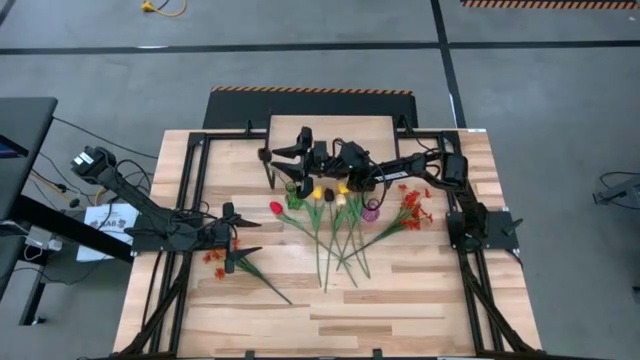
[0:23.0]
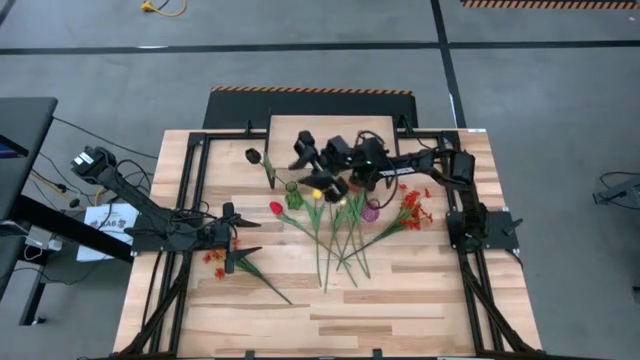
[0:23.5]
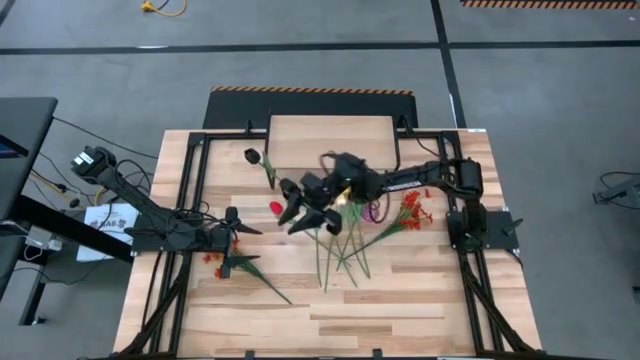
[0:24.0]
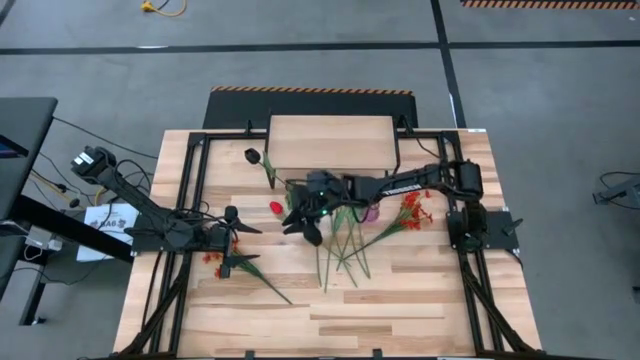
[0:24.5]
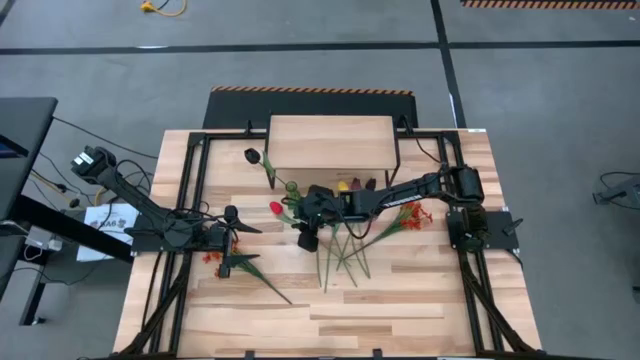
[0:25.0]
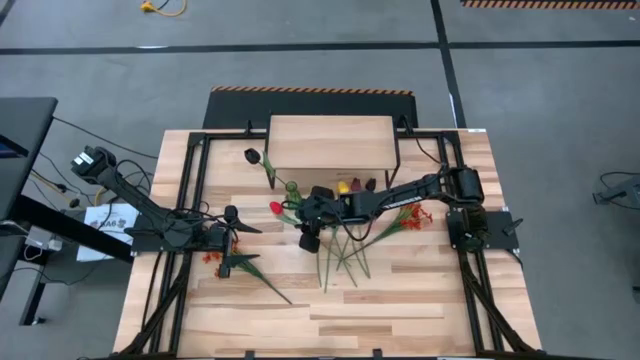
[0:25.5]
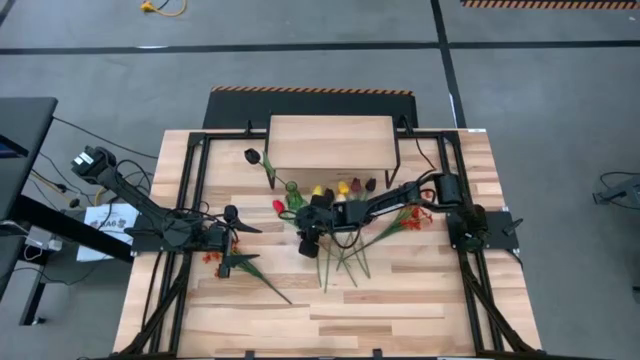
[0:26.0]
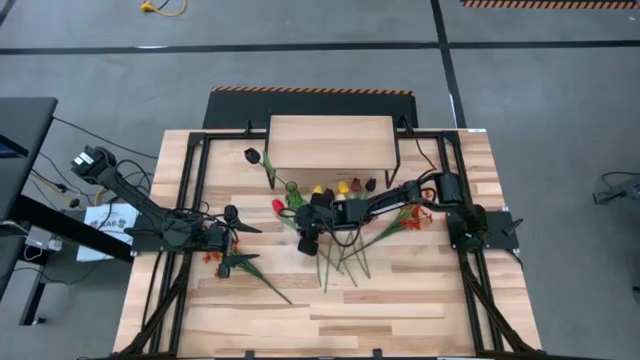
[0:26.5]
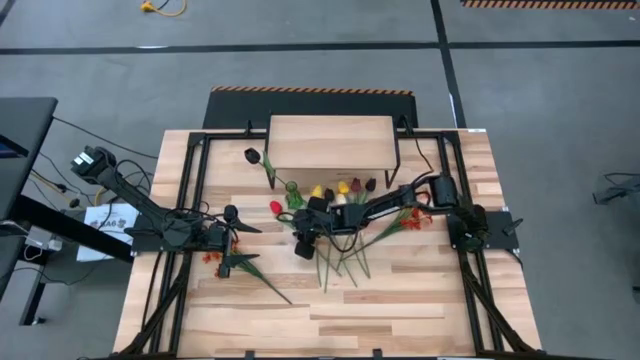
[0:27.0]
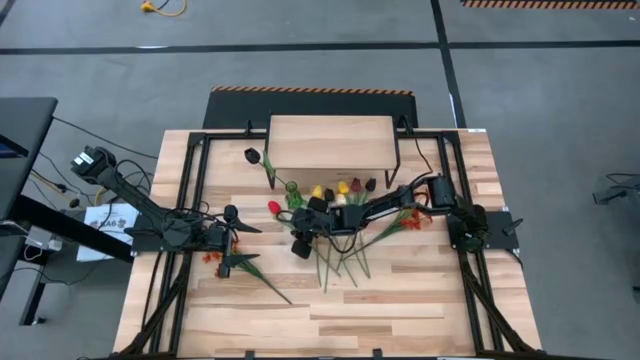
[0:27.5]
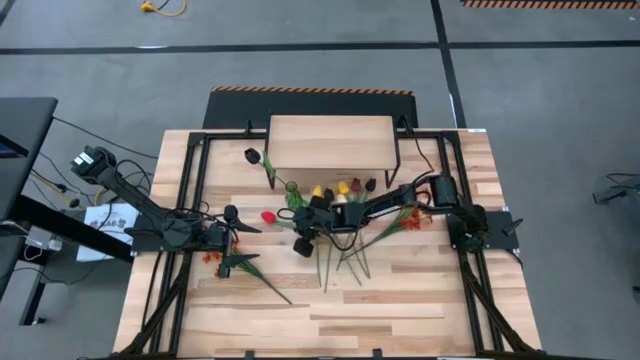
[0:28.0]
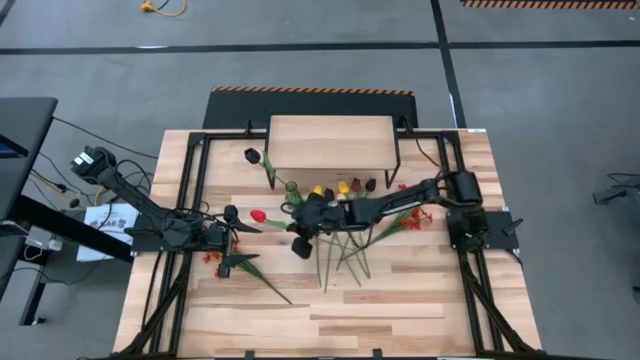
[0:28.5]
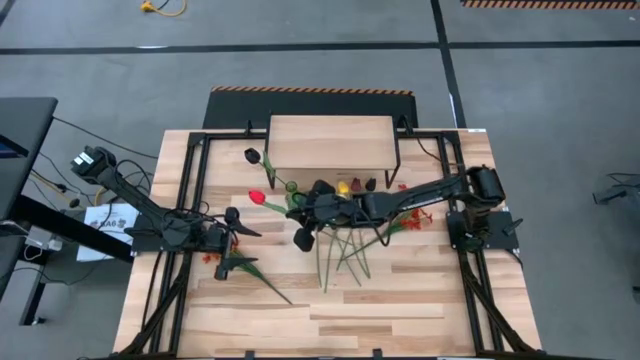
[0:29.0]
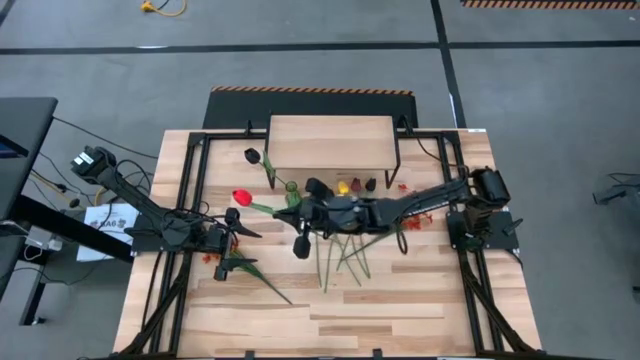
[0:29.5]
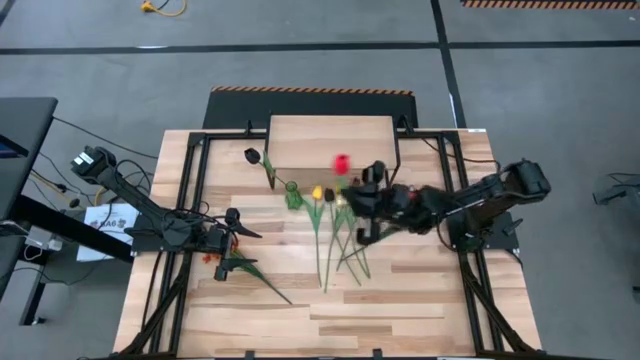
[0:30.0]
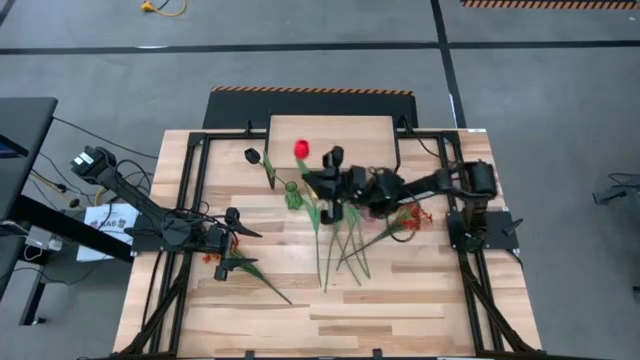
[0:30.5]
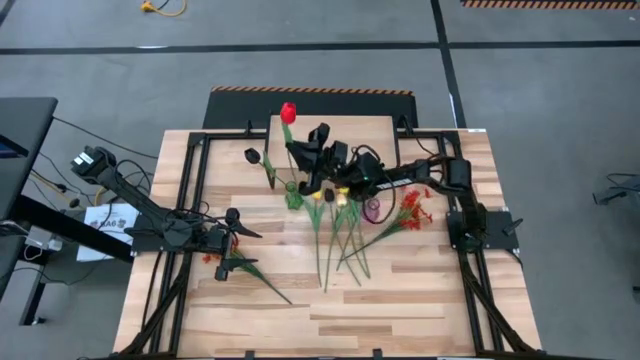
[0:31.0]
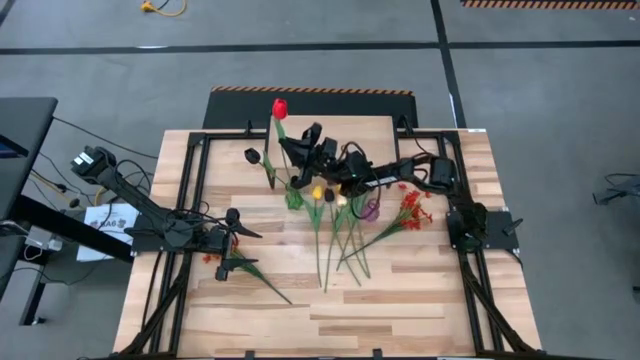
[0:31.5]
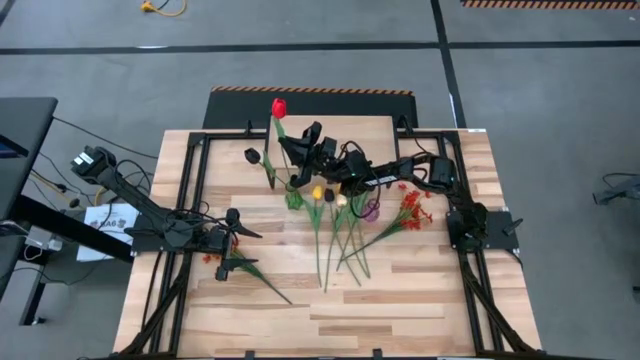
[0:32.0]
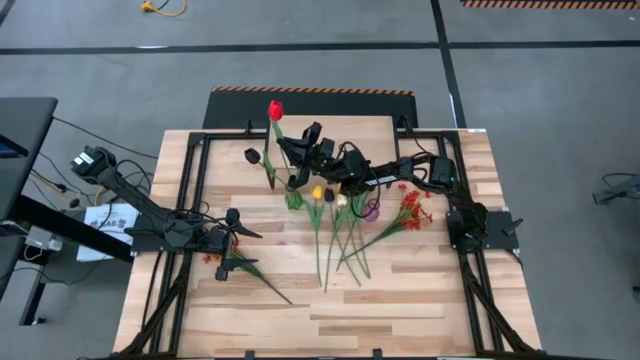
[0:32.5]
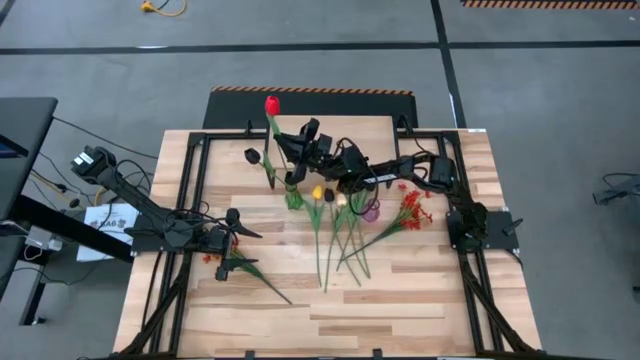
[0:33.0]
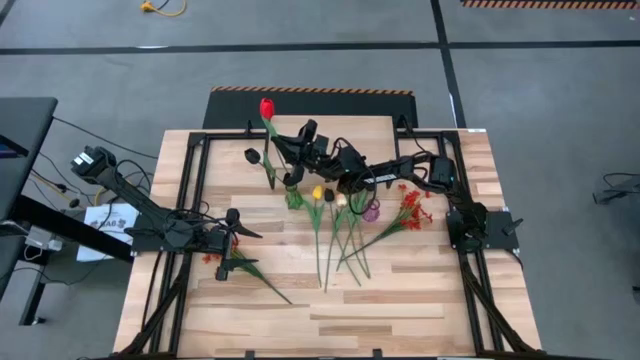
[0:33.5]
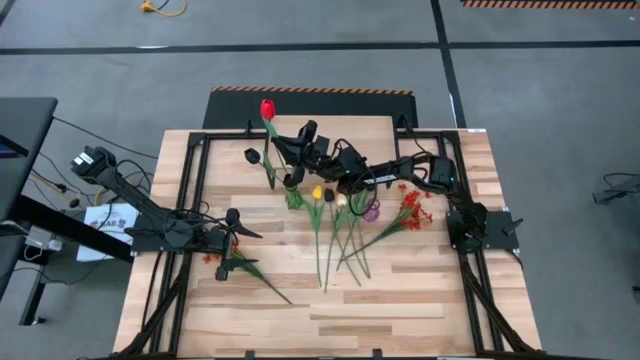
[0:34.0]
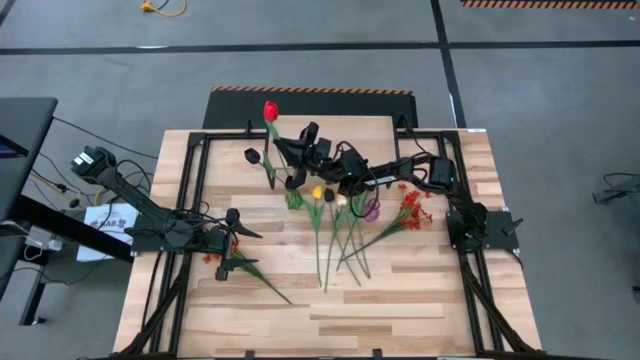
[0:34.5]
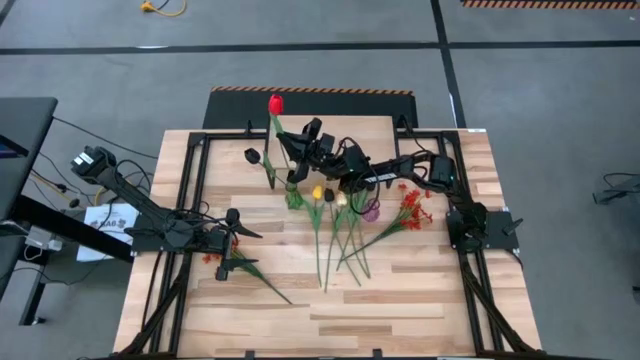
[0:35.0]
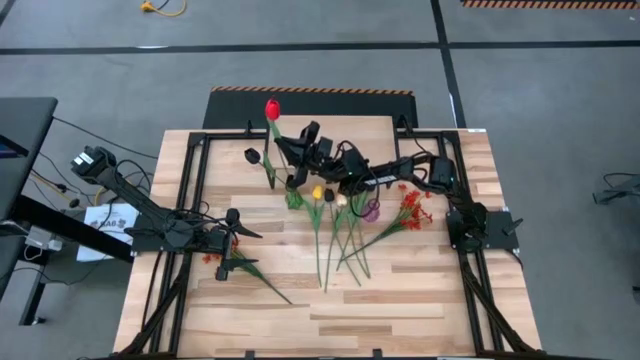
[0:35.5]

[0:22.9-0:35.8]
Task: Pick and place flowers into a vace then onto a shelf
Put the red tulip into the green vase

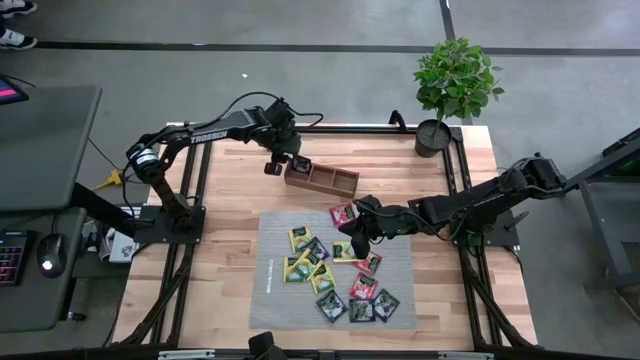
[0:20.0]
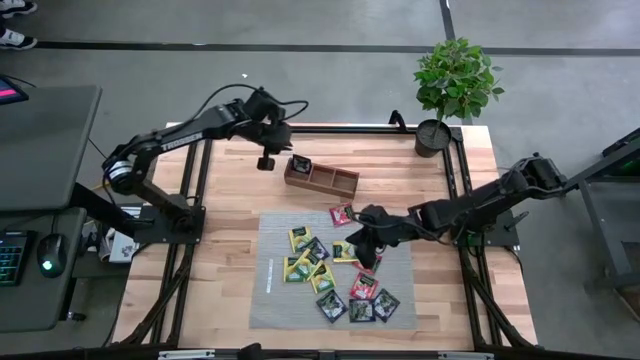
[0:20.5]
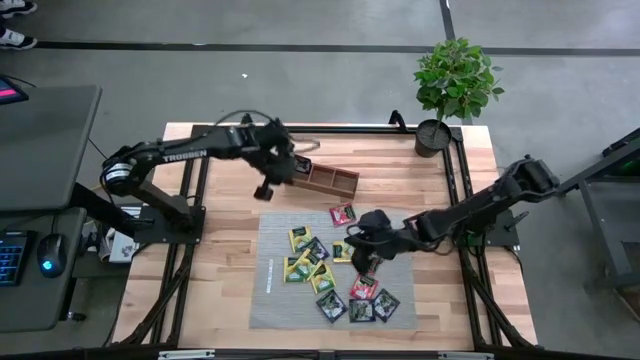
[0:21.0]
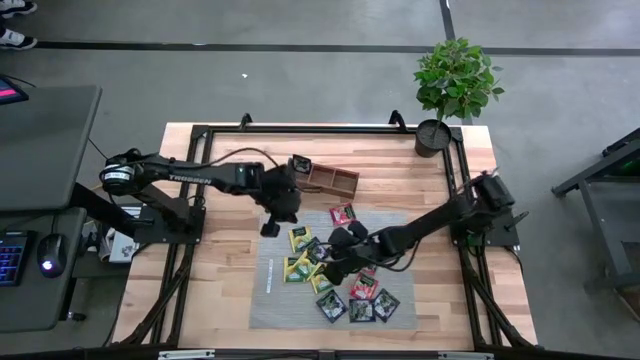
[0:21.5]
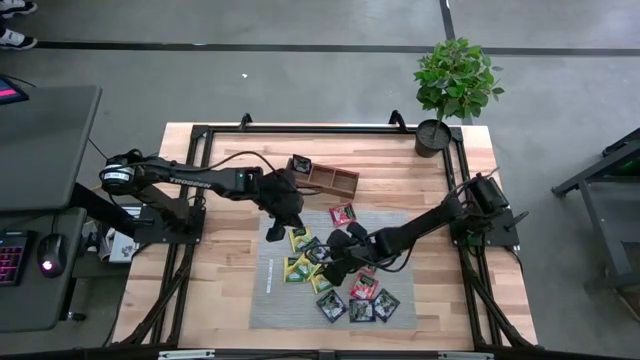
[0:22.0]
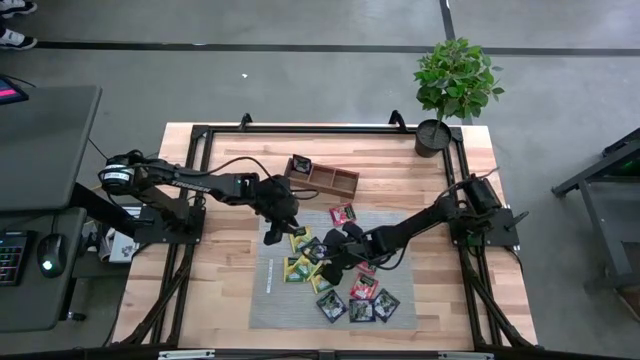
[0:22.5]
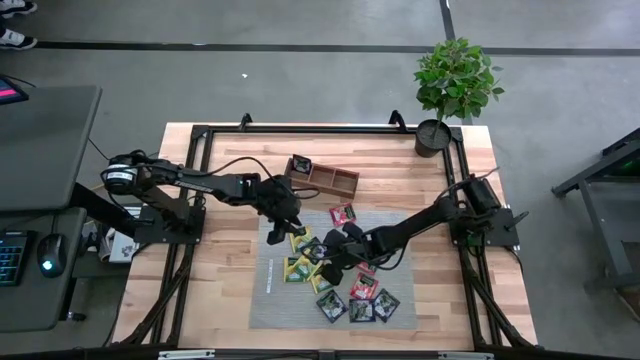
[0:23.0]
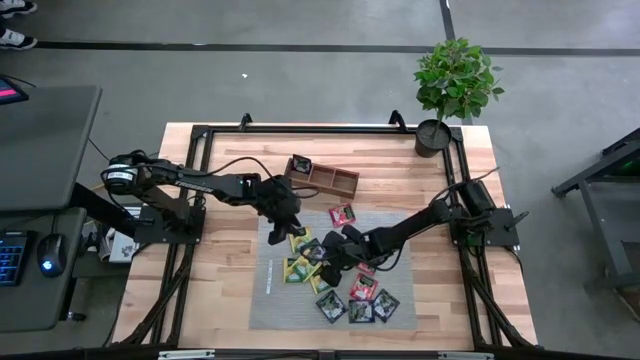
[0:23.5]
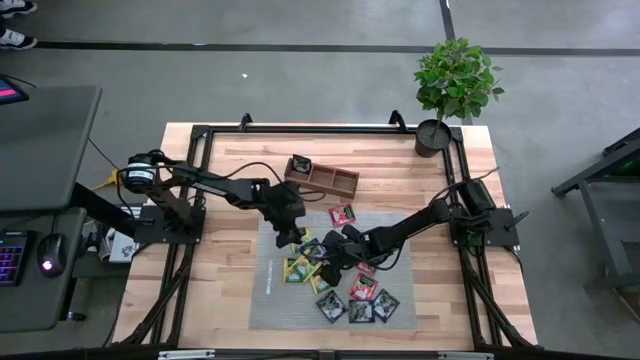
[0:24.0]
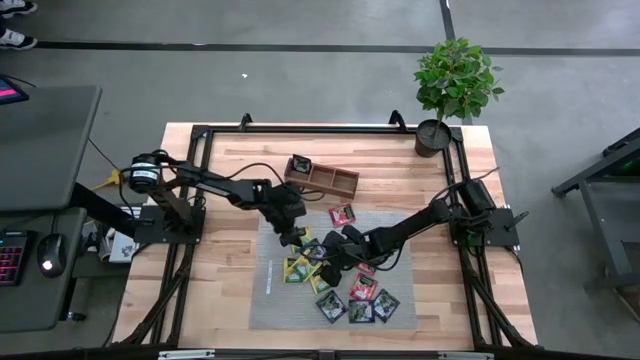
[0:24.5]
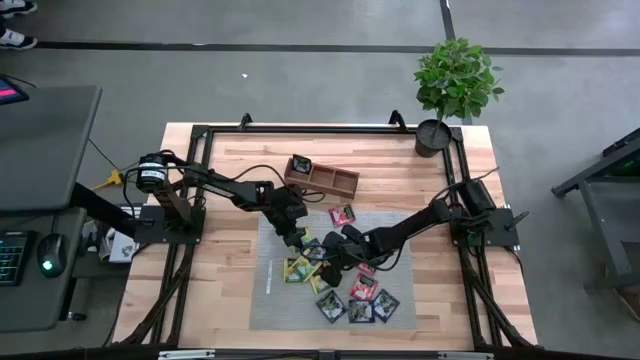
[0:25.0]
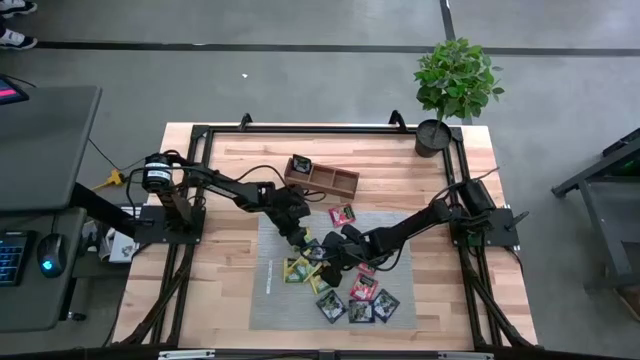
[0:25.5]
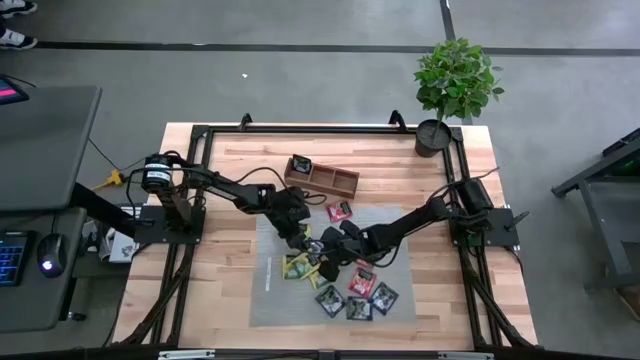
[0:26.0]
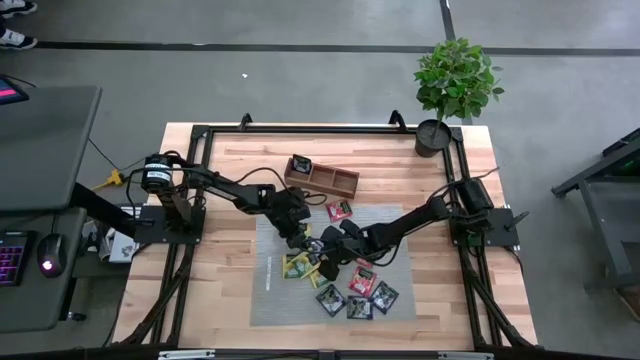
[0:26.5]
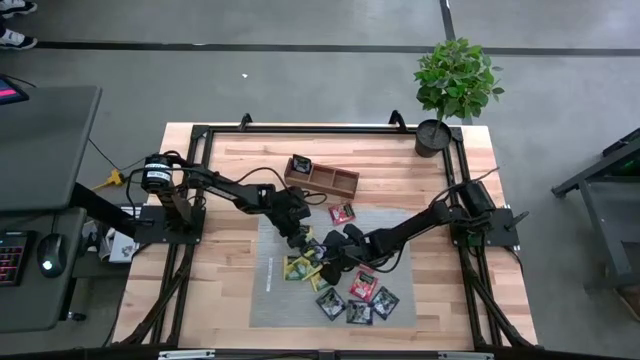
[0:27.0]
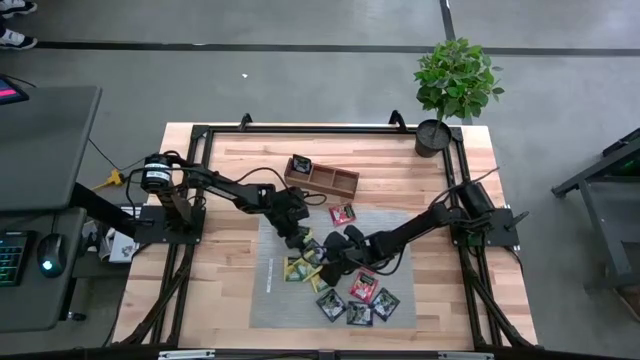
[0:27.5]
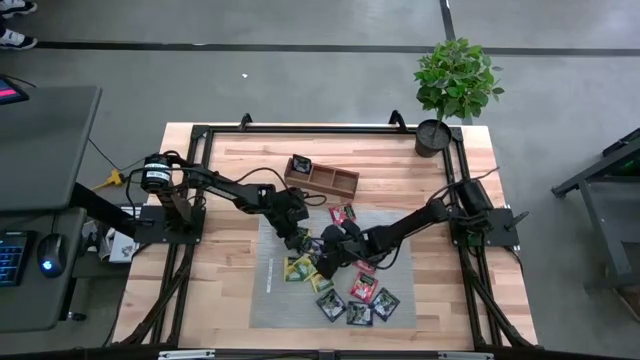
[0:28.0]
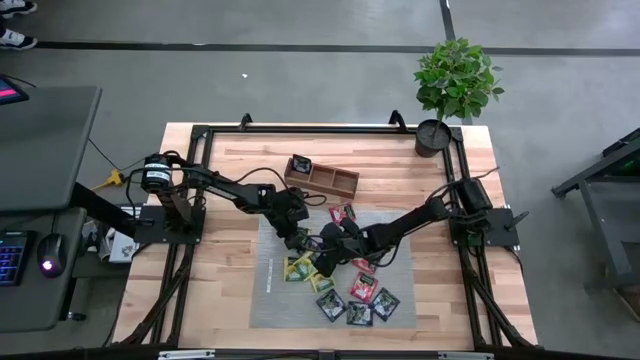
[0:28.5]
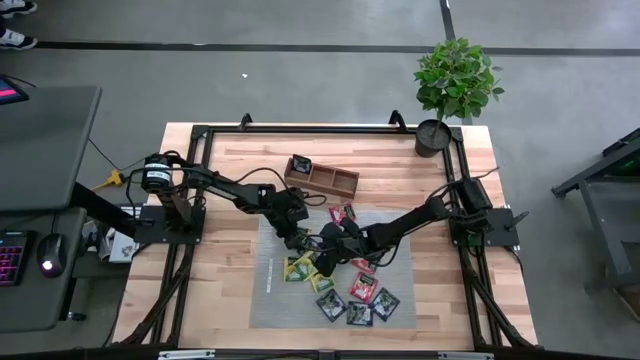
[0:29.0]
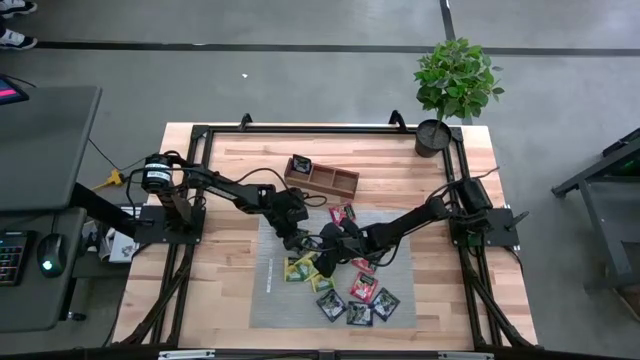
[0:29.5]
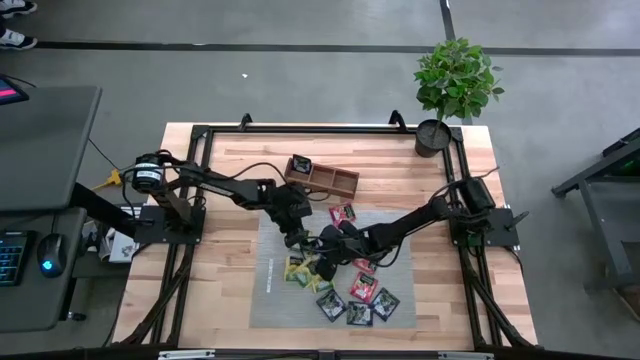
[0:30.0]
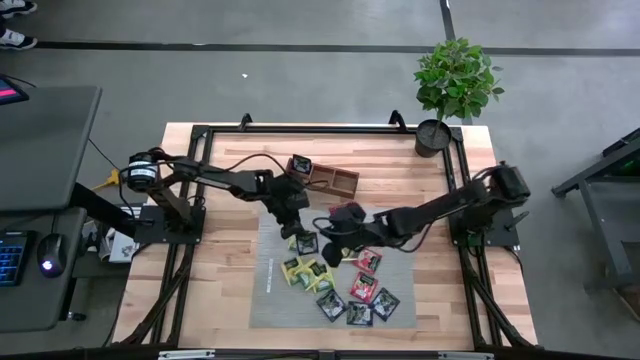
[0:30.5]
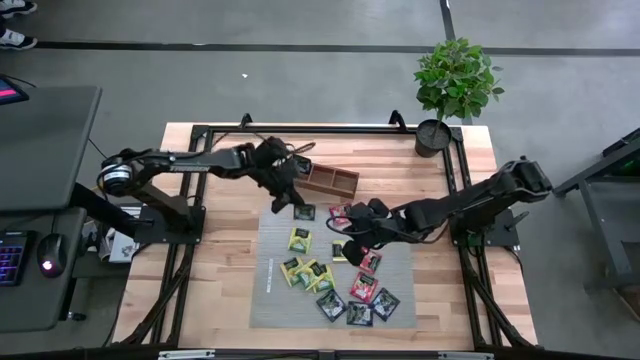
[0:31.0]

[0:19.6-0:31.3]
Task: Pick & Place Tea
Put the purple tea bag into the left section of the wooden organizer
